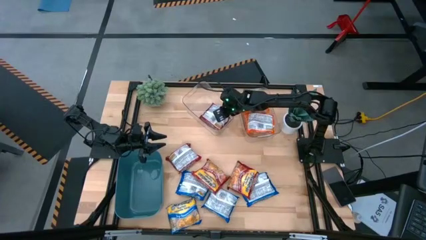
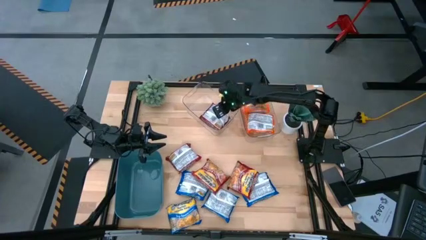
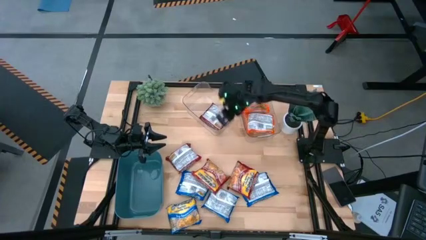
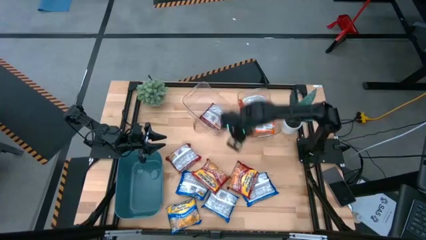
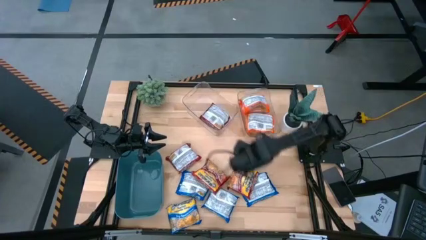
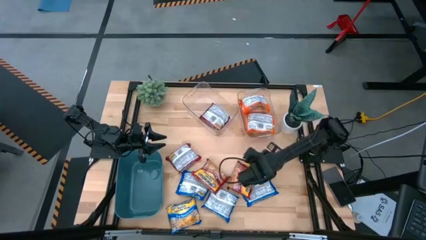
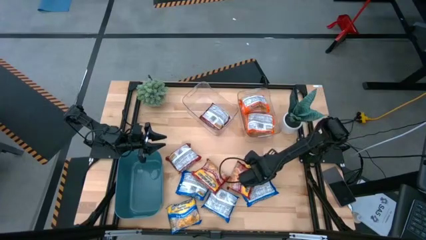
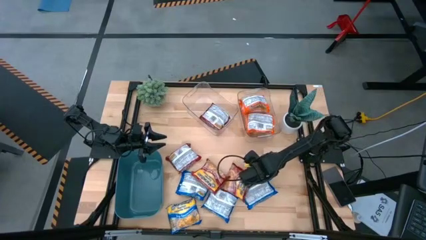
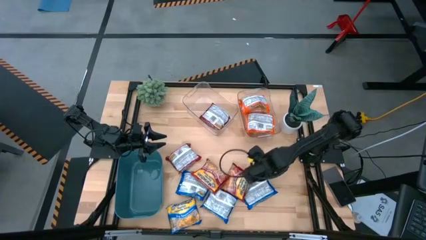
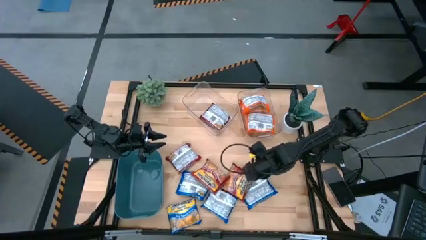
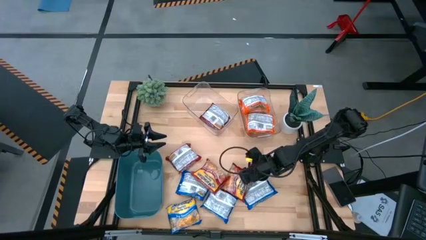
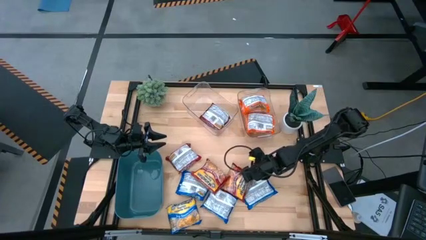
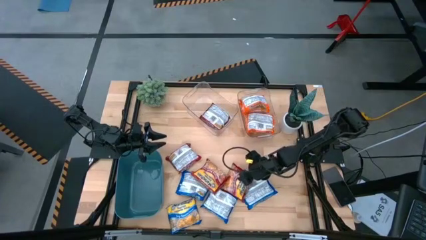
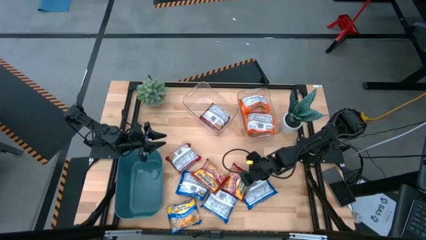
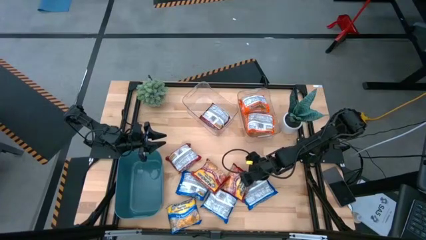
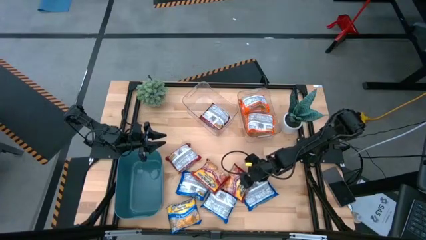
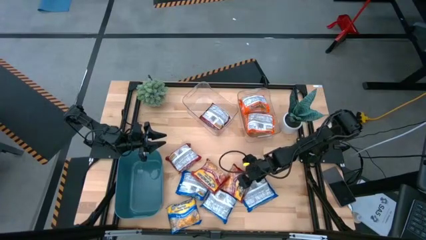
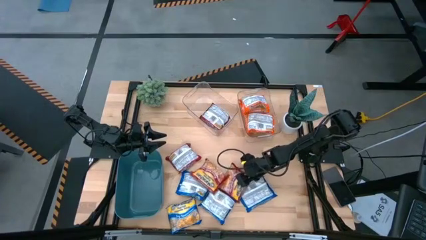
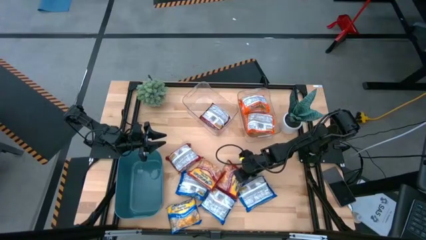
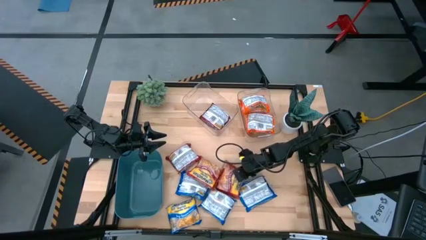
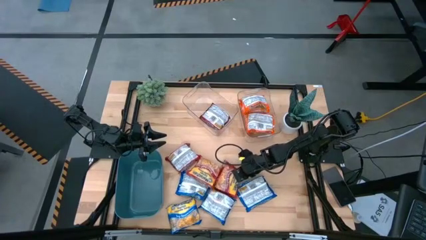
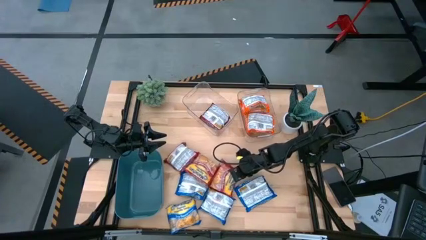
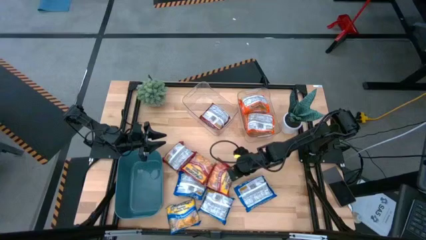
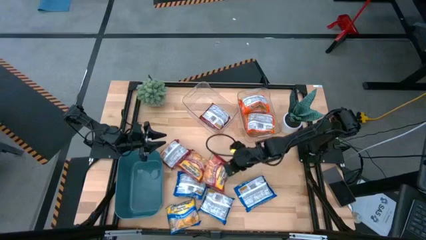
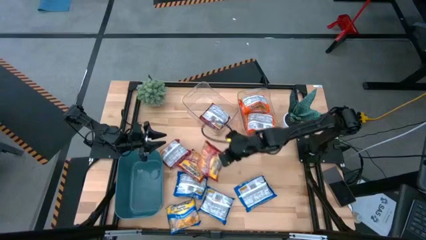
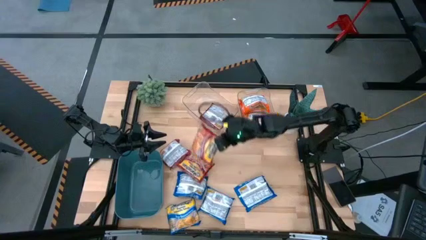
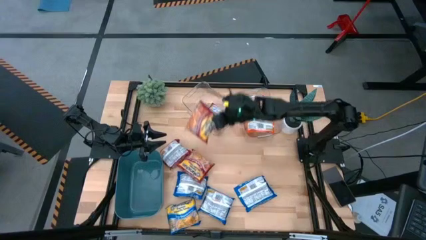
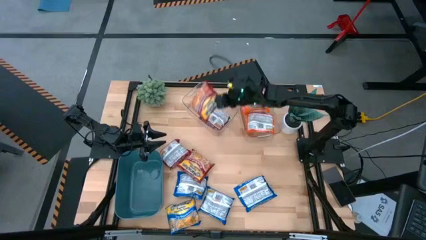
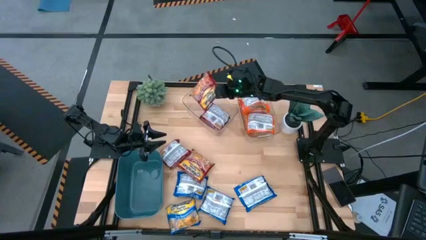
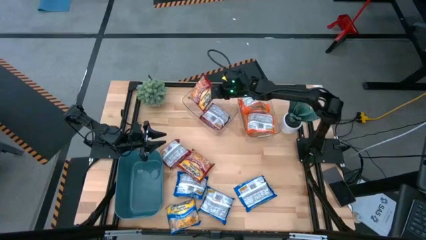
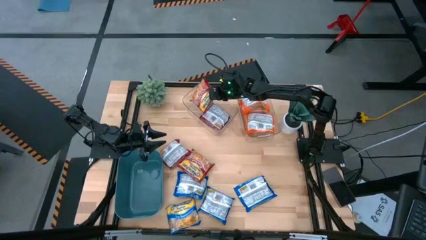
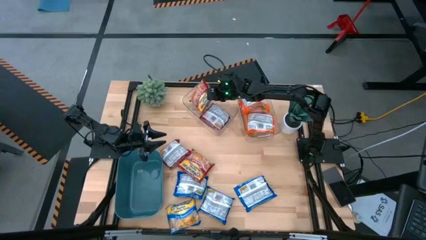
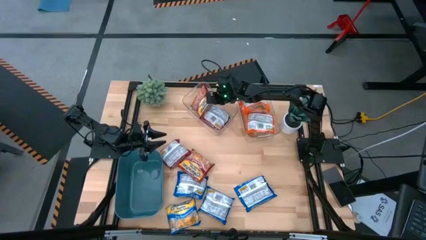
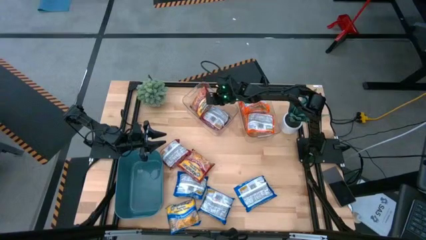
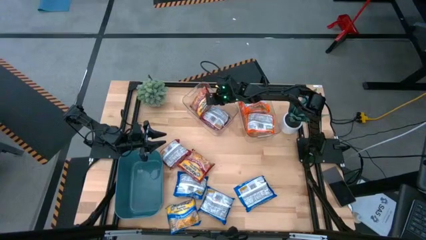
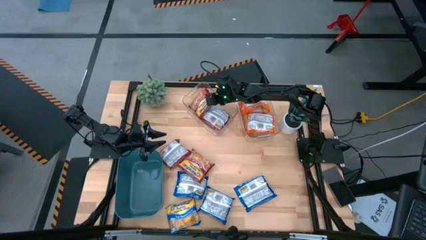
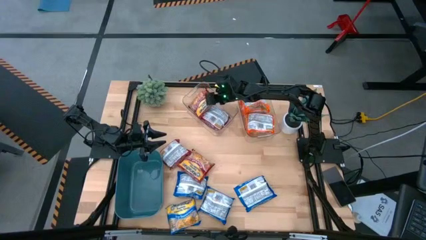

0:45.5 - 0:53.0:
Task: Sort Maruchan noodles
Put the red noodle pack into the left transparent bin

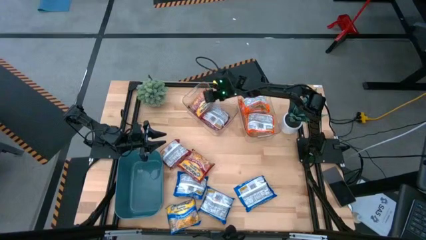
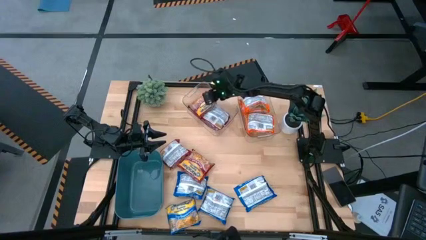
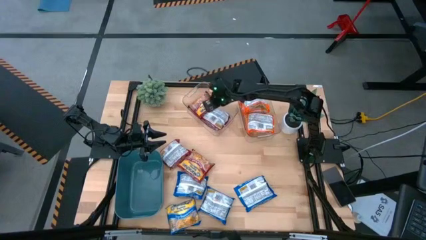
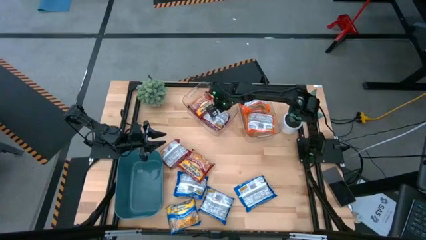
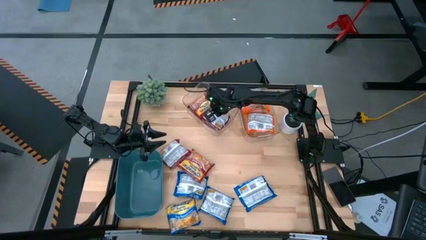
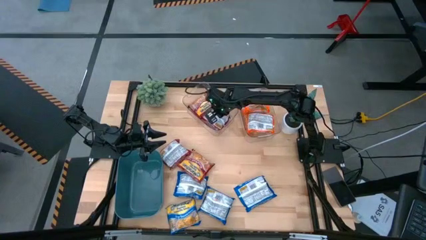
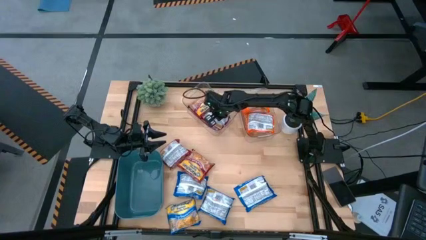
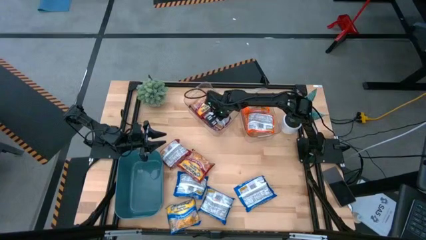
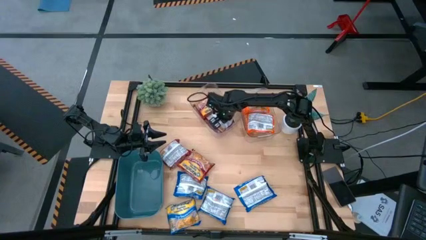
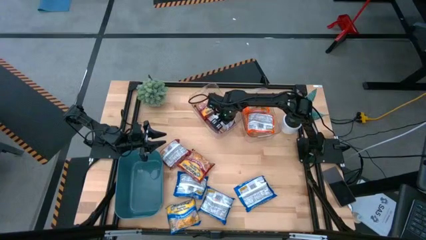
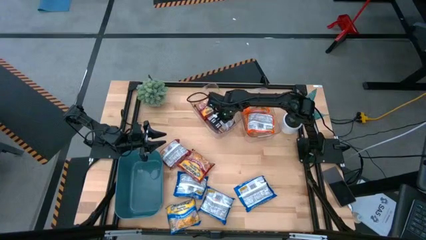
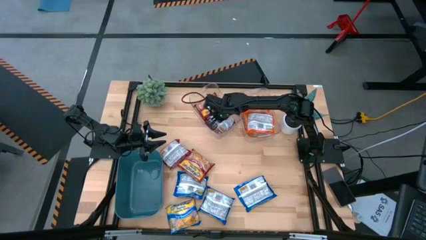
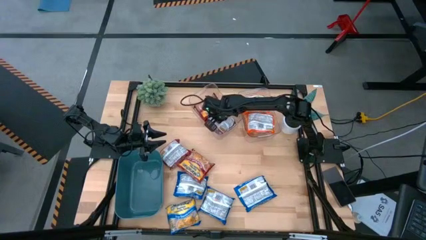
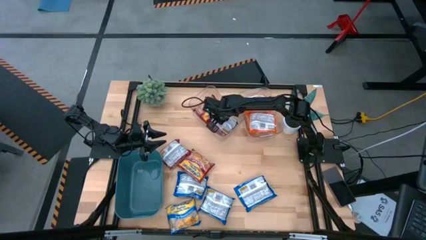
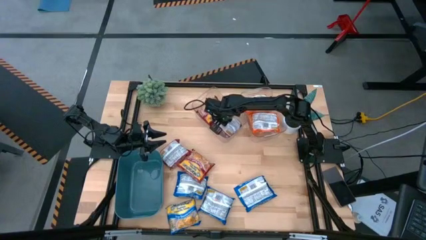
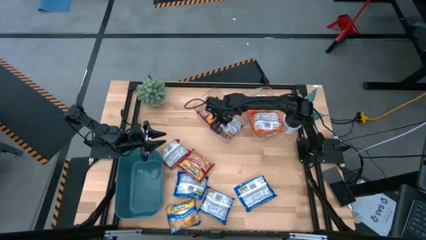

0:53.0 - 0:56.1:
Adjust the red noodle pack into the left transparent bin

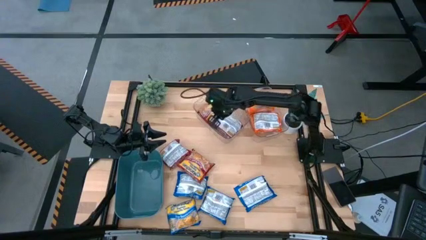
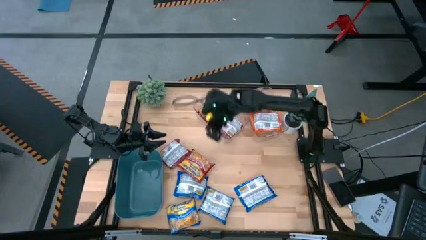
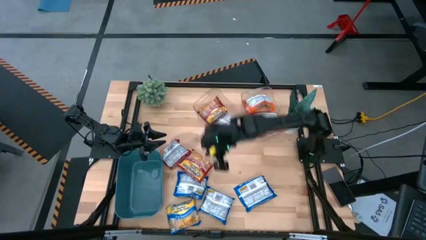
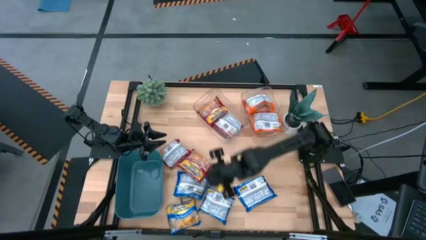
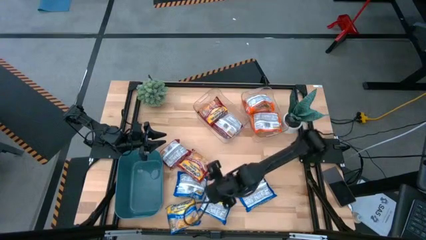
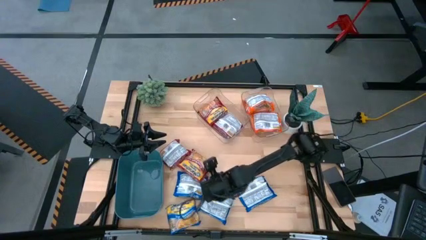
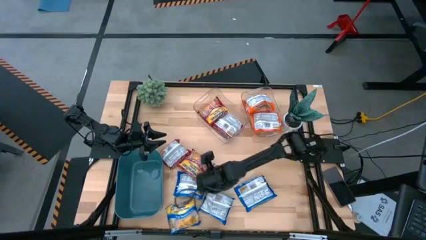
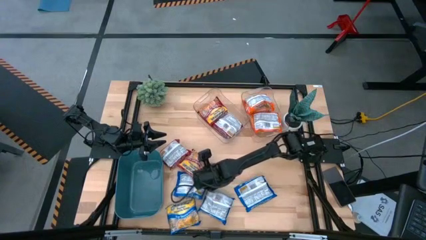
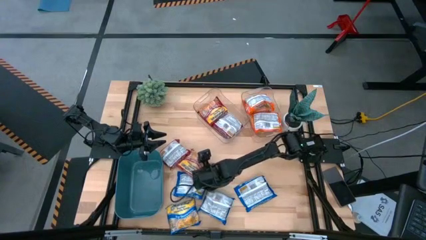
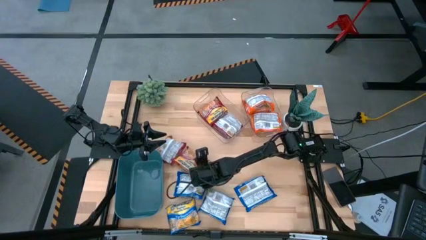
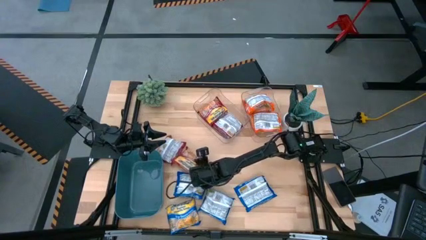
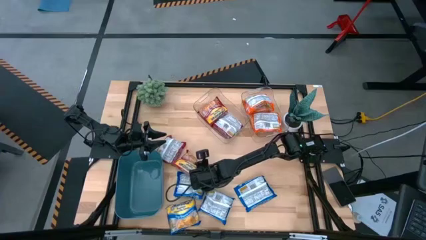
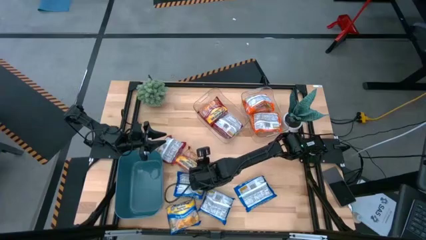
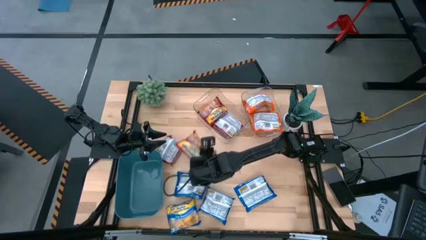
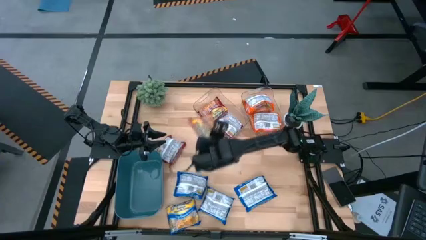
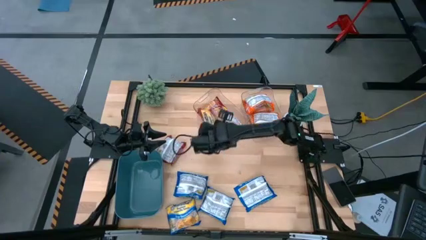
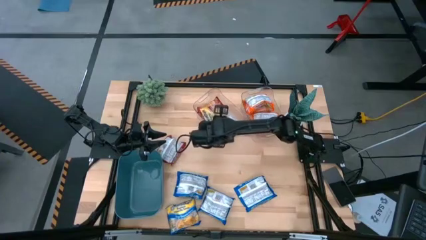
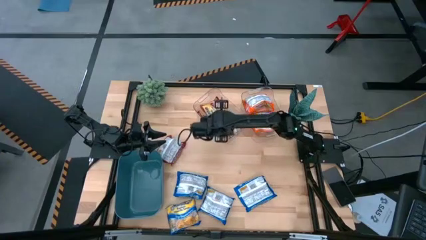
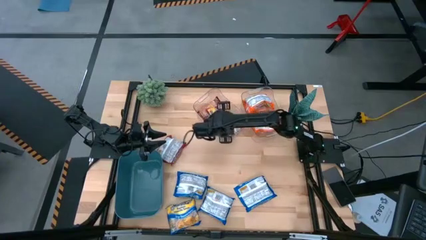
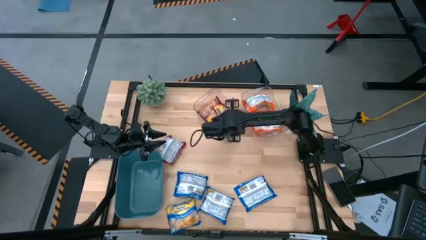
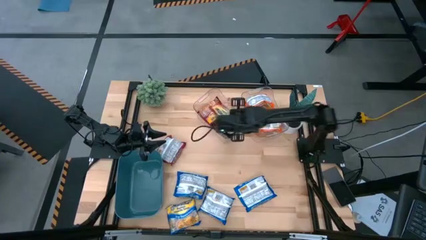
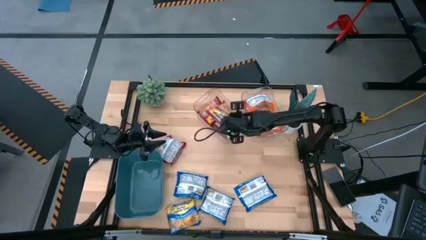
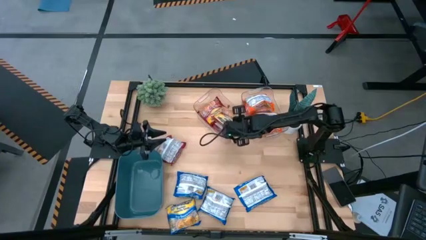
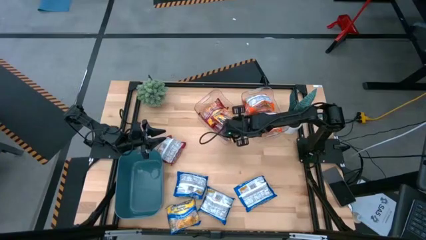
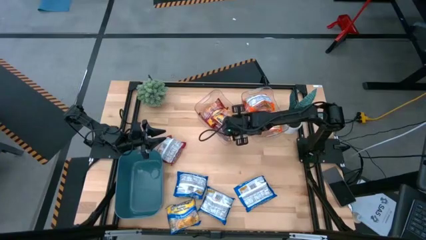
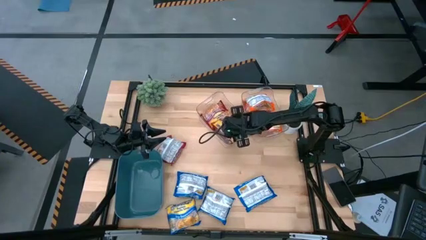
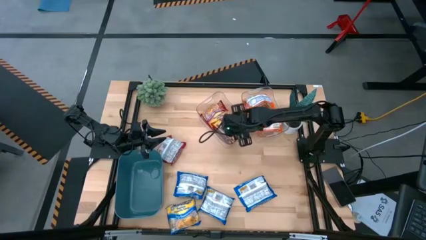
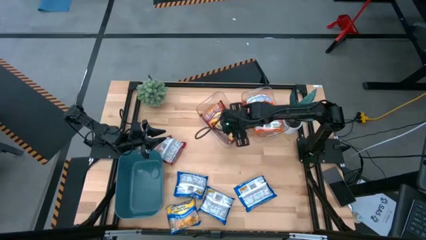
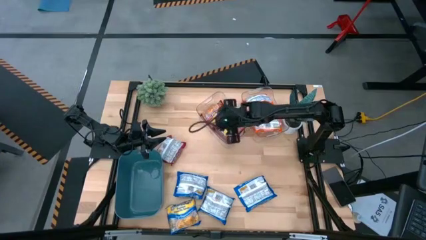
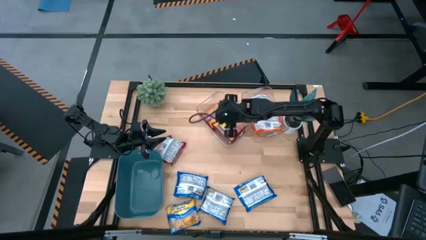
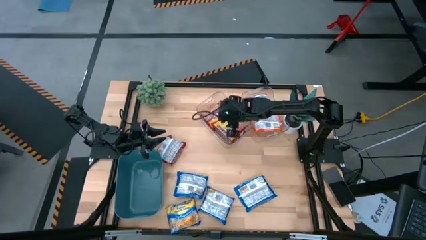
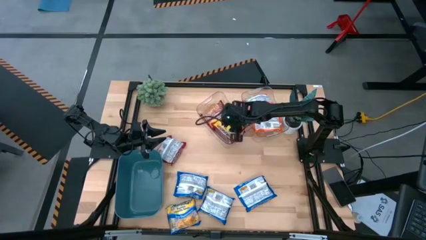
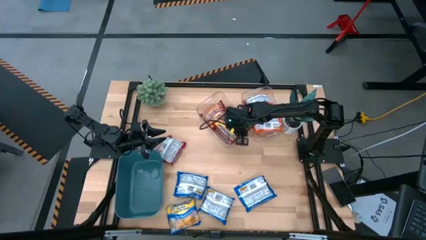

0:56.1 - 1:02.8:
Put the red noodle pack into the left transparent bin
